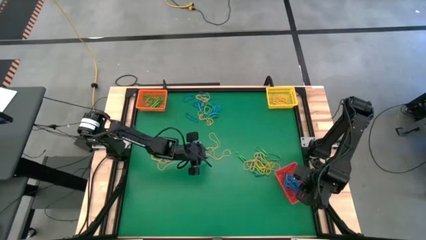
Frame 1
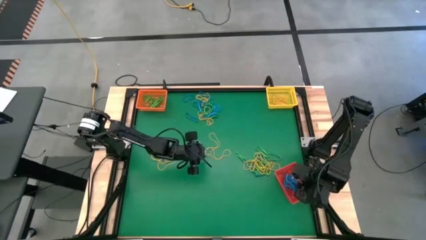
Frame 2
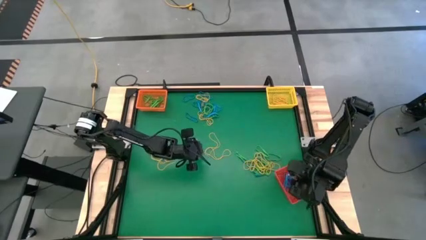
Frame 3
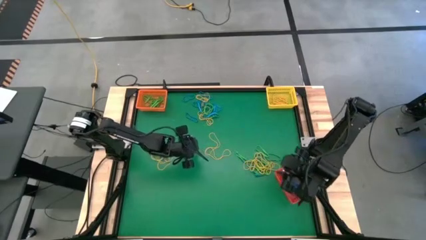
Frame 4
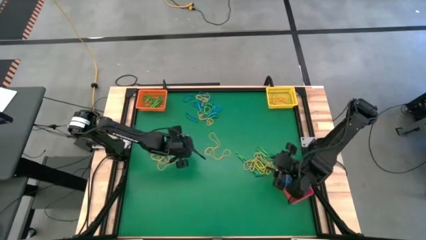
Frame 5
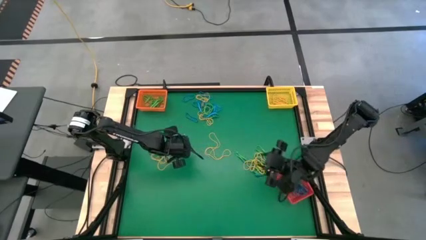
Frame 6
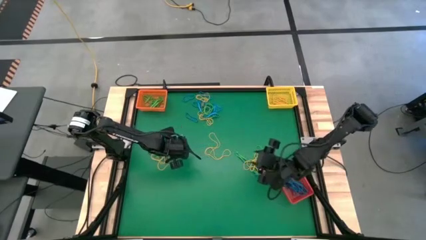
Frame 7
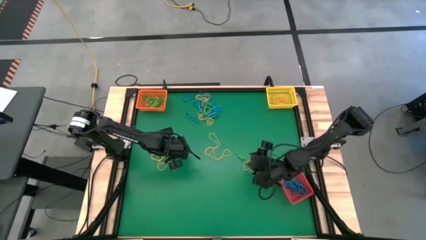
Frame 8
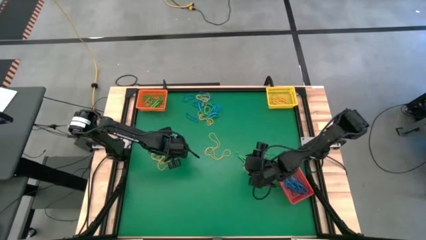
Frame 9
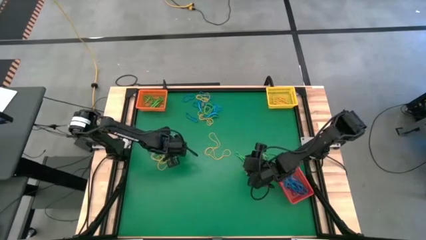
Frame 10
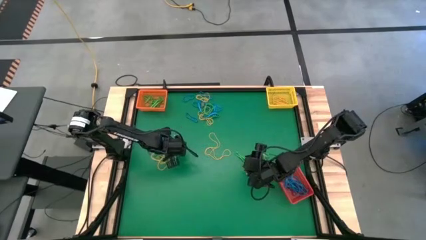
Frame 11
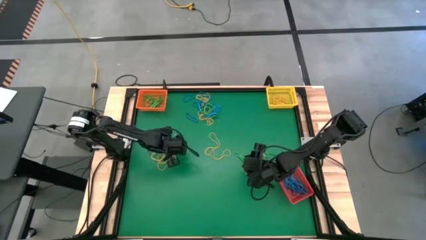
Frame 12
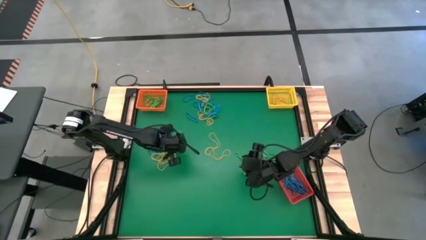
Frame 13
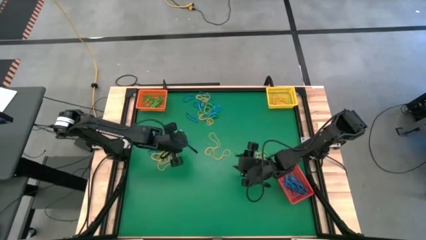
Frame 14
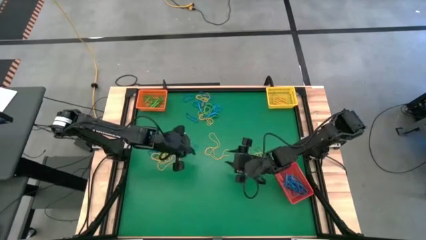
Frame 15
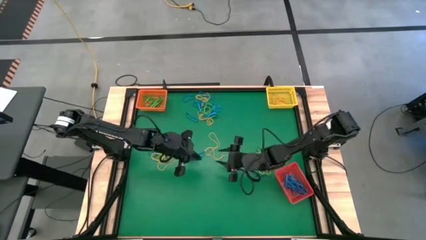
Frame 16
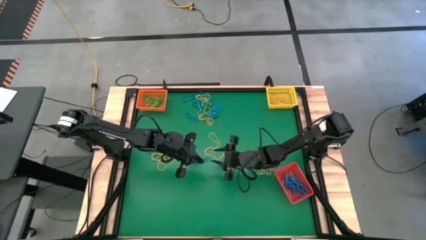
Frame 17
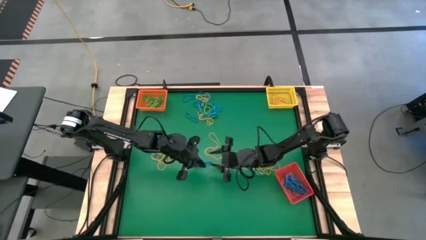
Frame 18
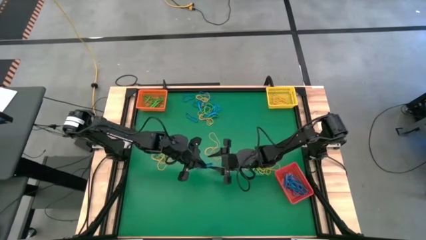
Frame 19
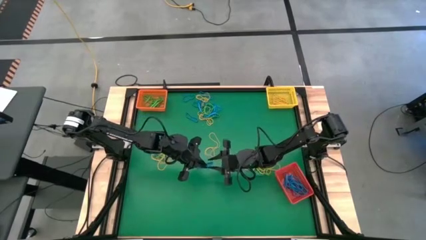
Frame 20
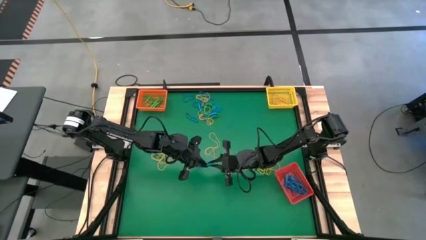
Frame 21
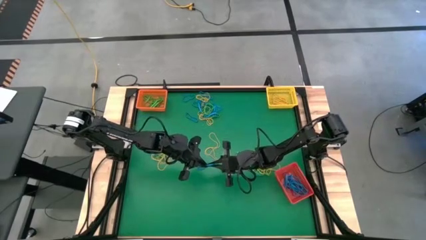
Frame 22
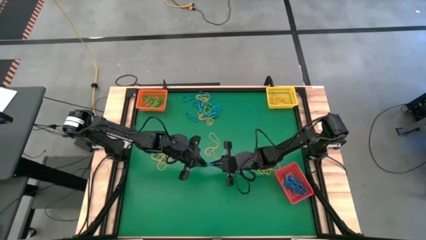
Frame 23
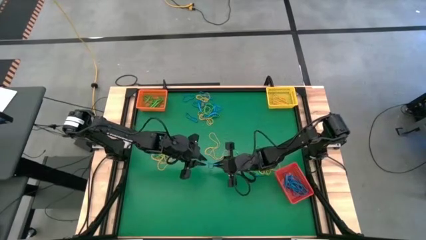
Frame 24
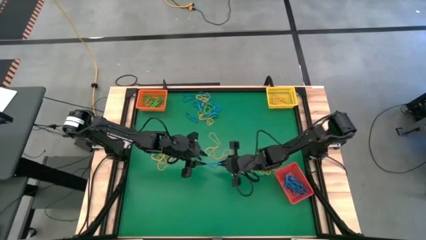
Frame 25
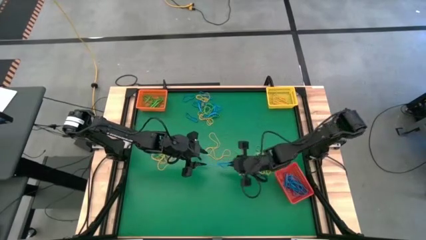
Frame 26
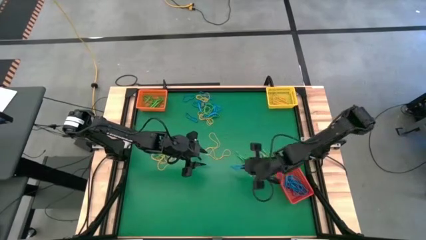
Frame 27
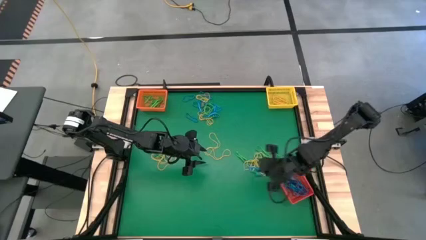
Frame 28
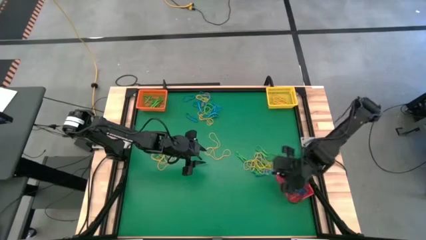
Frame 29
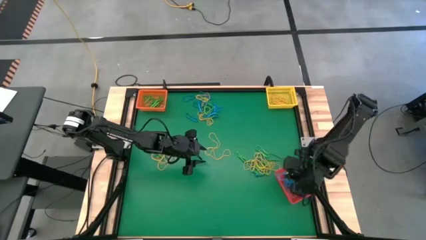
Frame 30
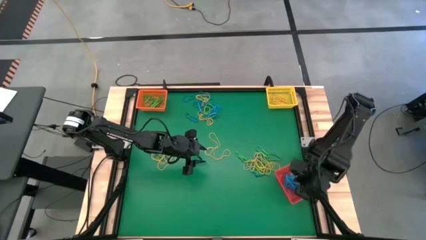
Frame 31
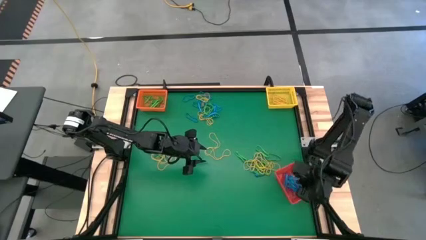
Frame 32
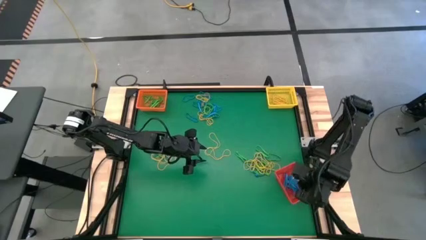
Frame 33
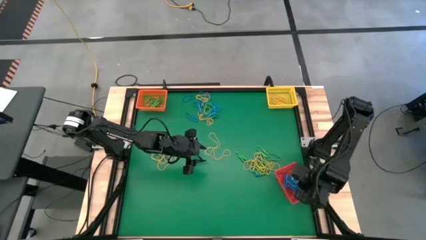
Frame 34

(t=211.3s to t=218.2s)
Task: Sort rubber bands into baskets
Put the blue rubber band into the red bin

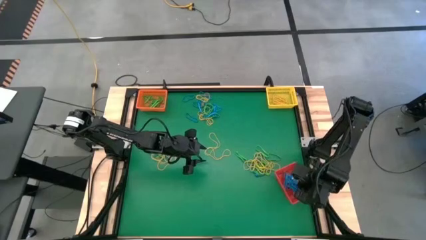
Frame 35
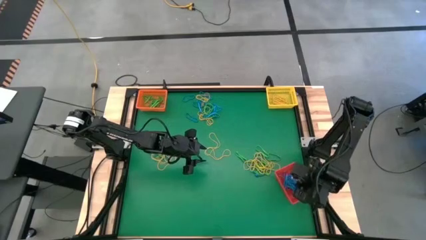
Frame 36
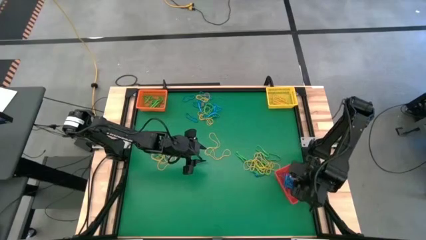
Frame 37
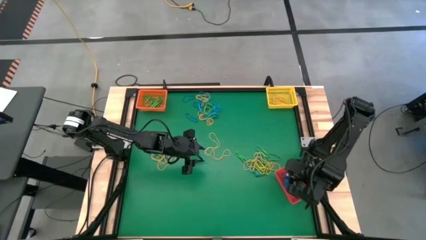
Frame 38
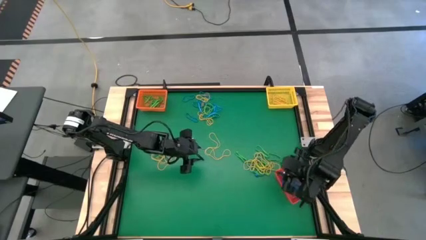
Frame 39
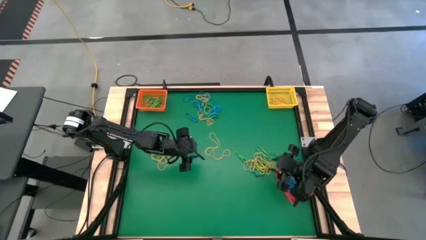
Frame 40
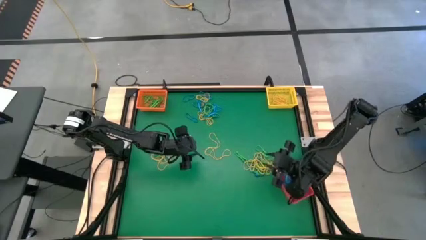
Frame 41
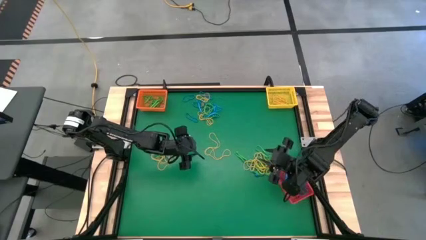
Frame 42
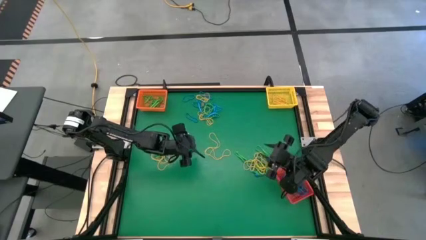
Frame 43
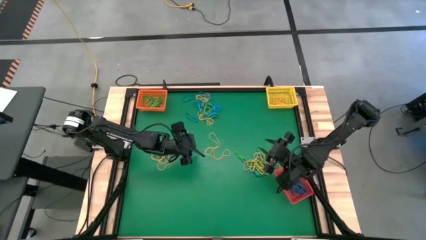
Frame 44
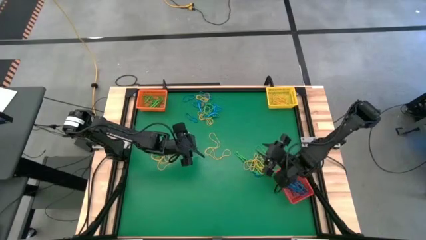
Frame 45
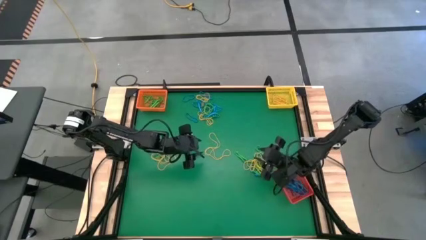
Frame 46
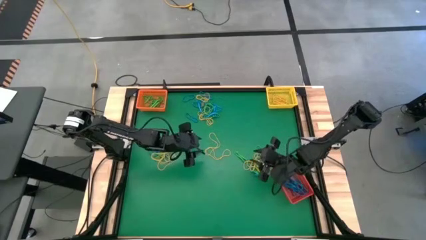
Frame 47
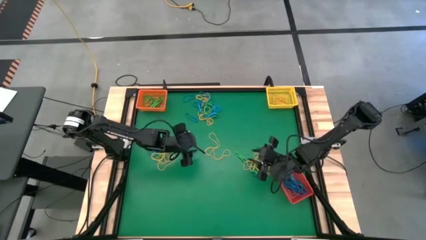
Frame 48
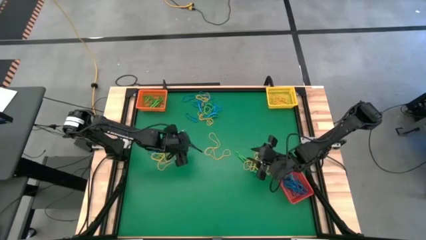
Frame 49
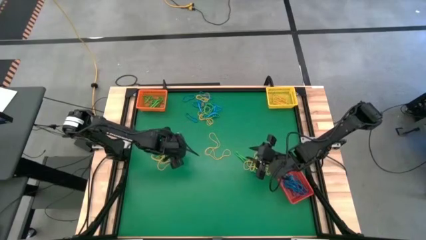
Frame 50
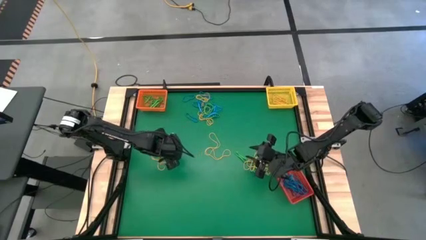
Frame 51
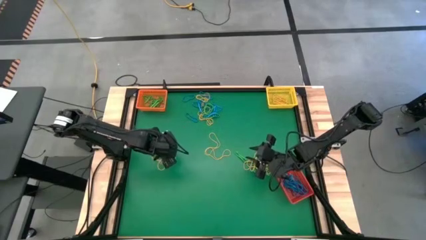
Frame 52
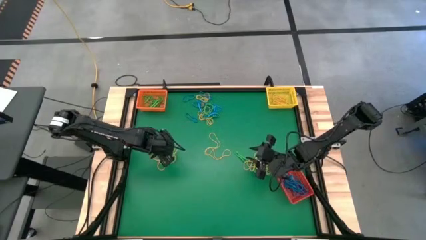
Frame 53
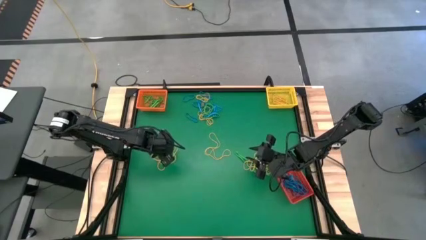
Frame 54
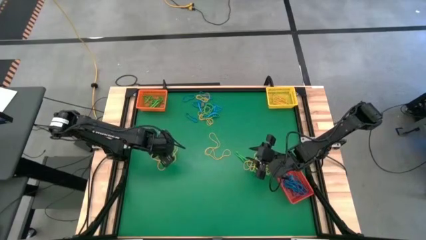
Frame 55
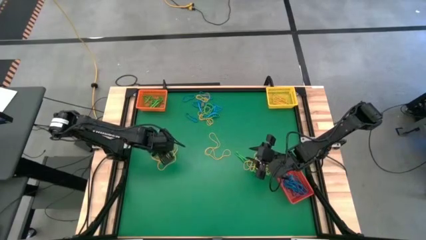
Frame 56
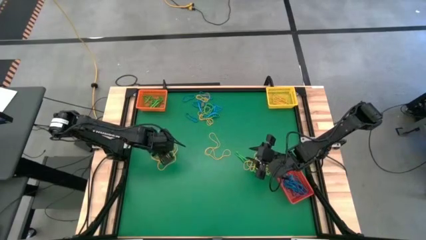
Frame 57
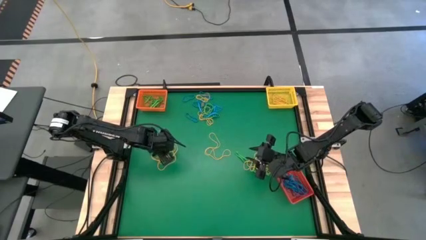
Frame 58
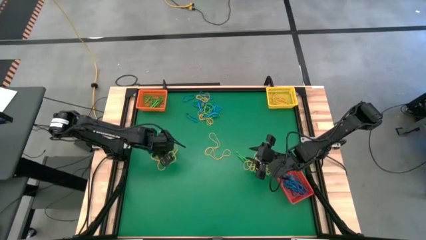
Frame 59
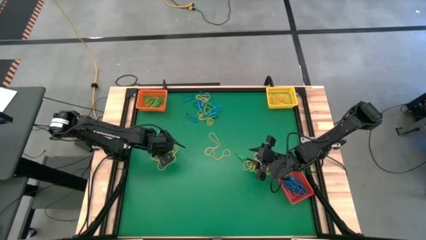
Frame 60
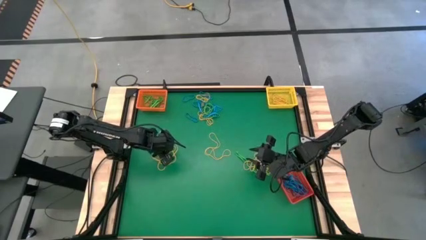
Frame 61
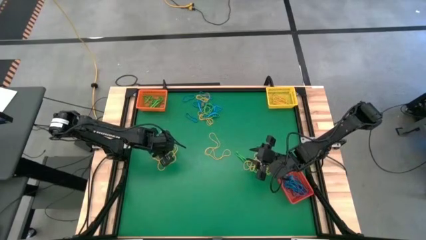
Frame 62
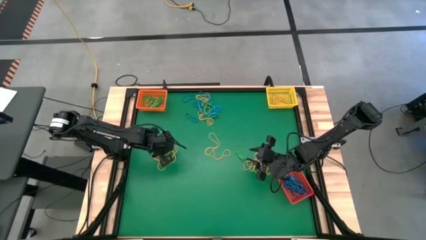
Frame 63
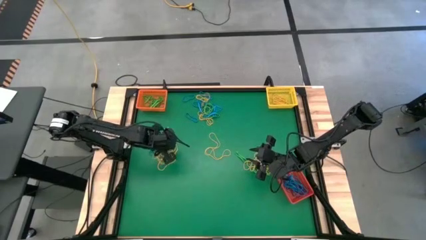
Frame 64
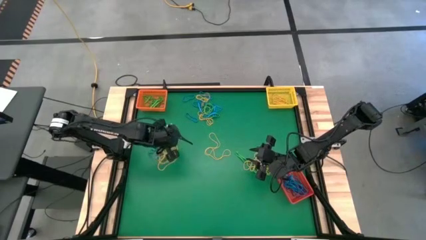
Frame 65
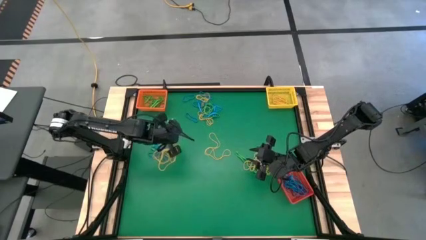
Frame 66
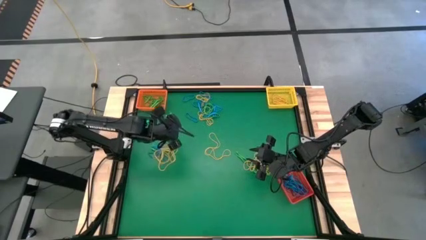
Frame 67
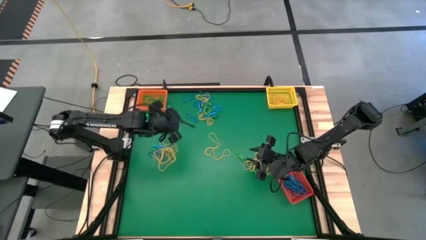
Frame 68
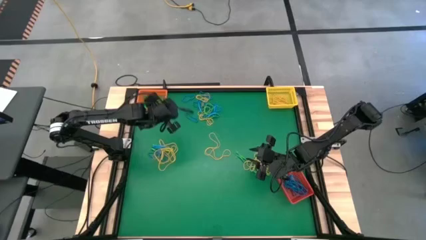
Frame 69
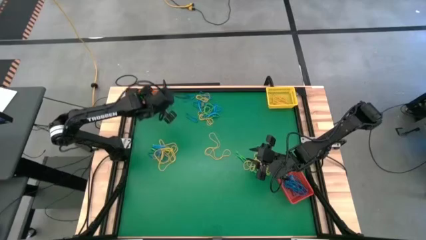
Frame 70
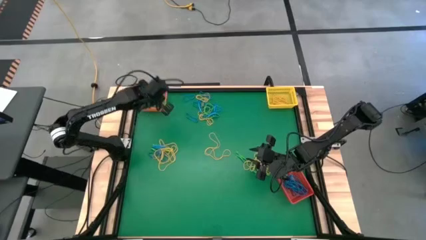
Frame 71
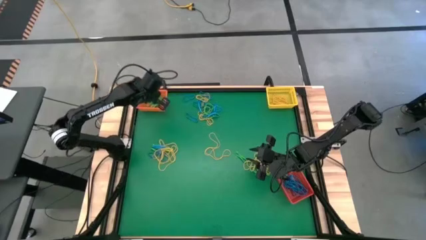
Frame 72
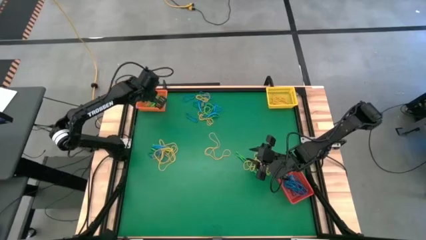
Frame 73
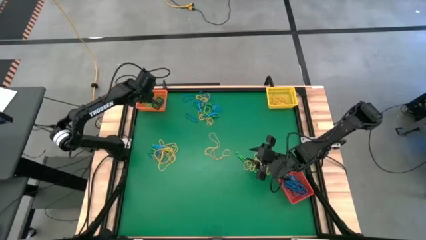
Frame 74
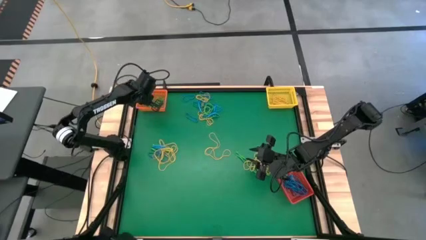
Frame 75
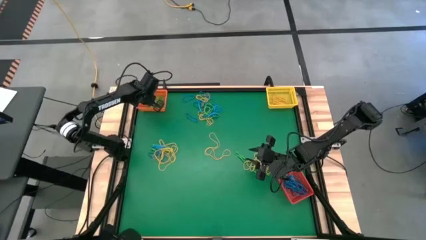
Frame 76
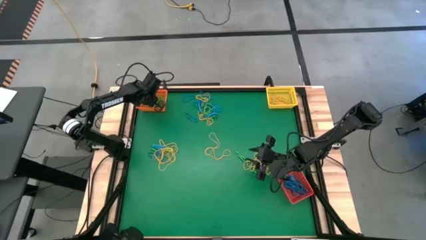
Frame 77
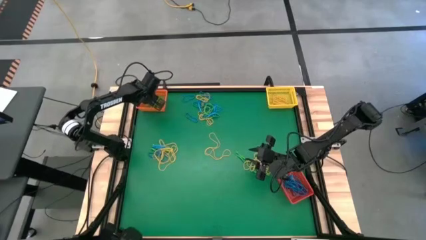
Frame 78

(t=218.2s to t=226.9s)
Put the green rubber band into the orange bin
